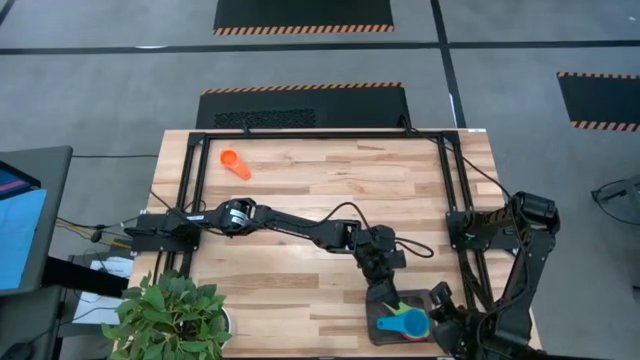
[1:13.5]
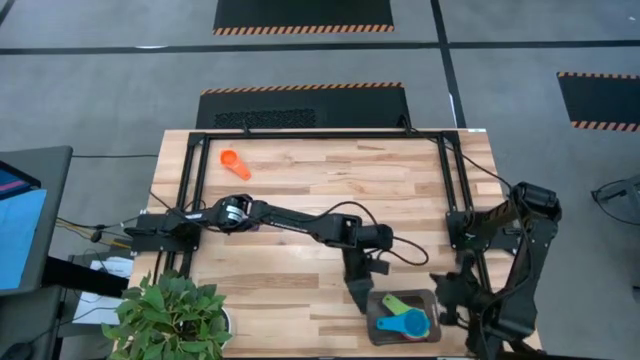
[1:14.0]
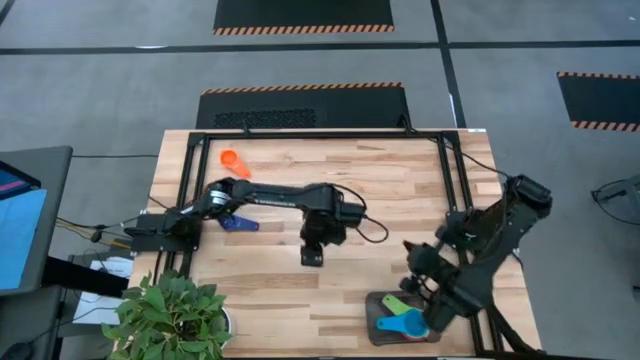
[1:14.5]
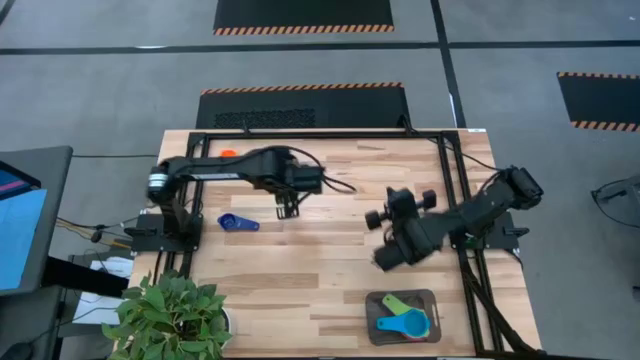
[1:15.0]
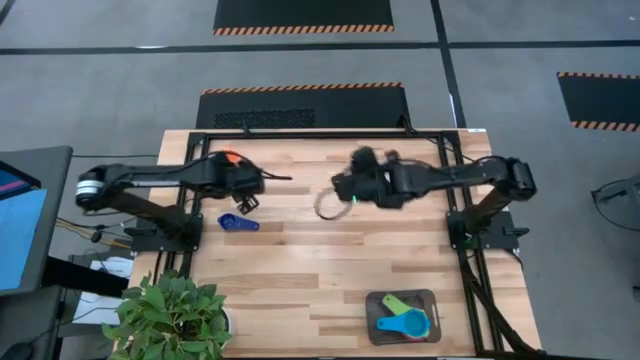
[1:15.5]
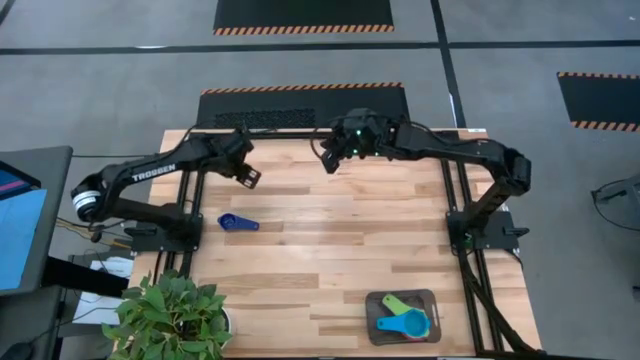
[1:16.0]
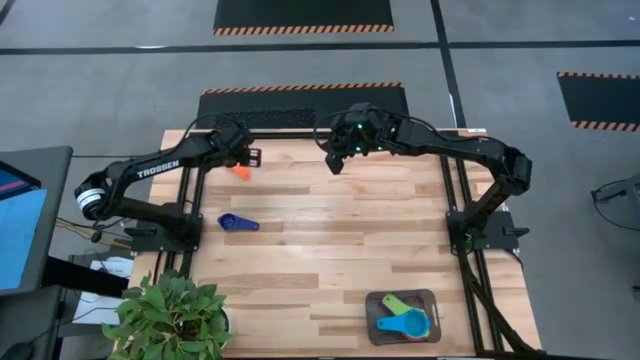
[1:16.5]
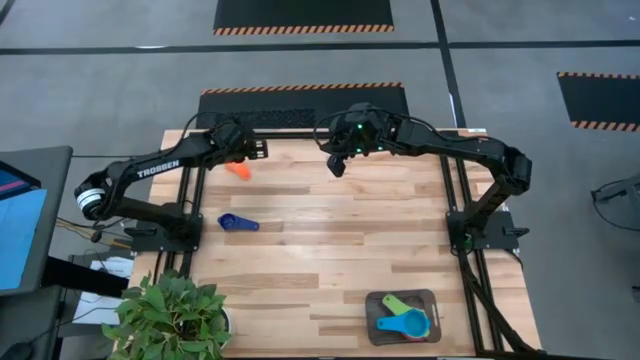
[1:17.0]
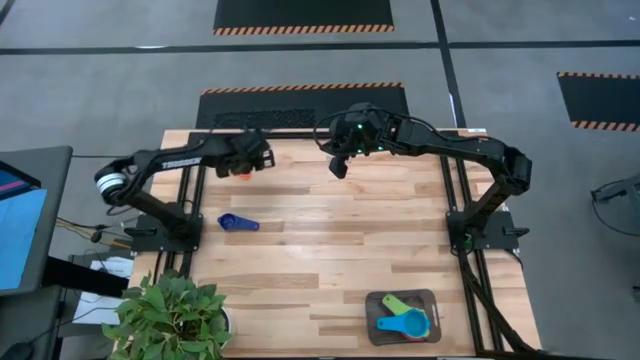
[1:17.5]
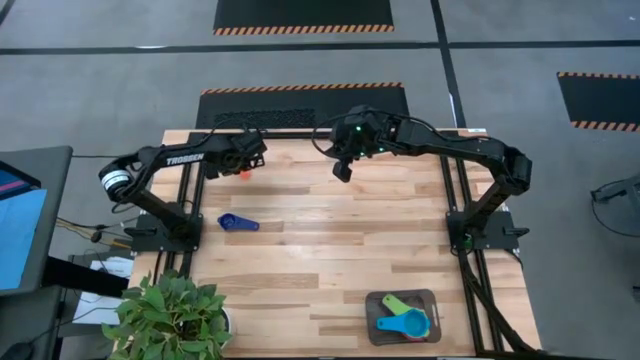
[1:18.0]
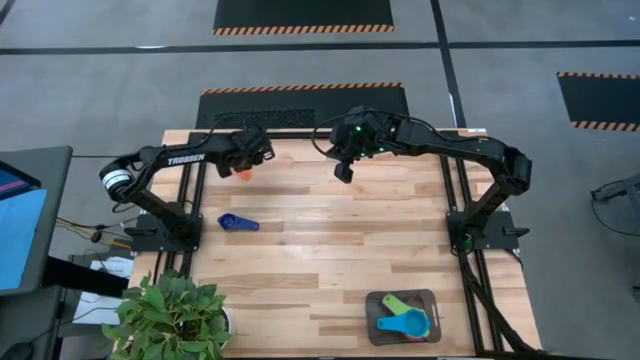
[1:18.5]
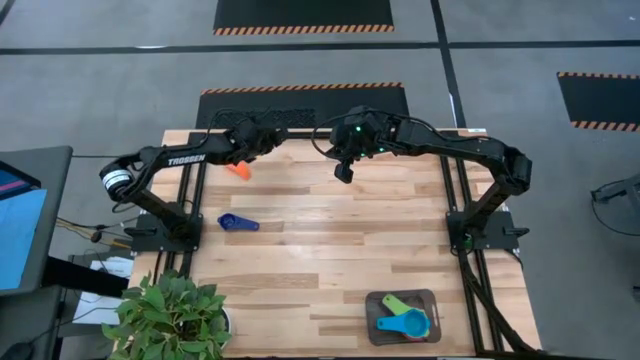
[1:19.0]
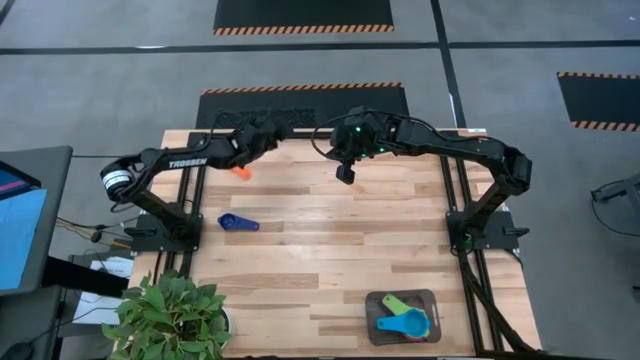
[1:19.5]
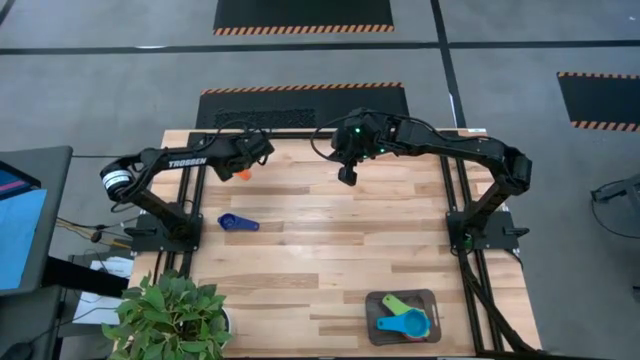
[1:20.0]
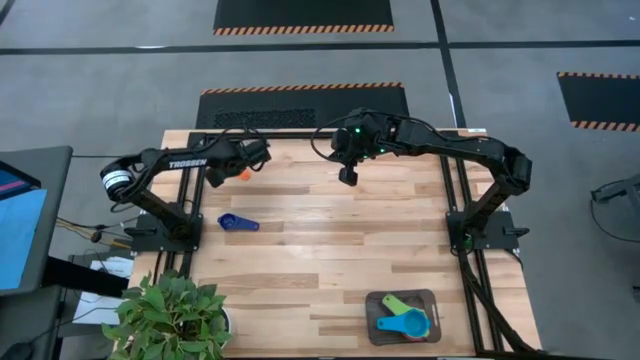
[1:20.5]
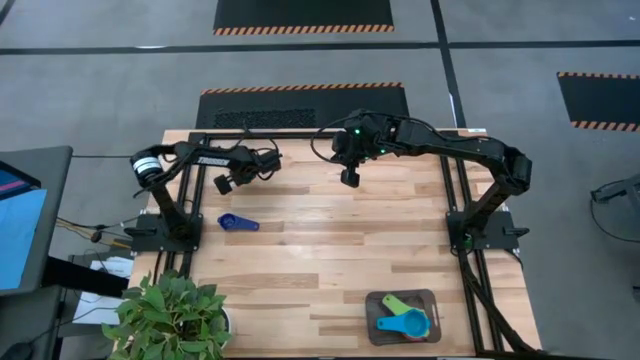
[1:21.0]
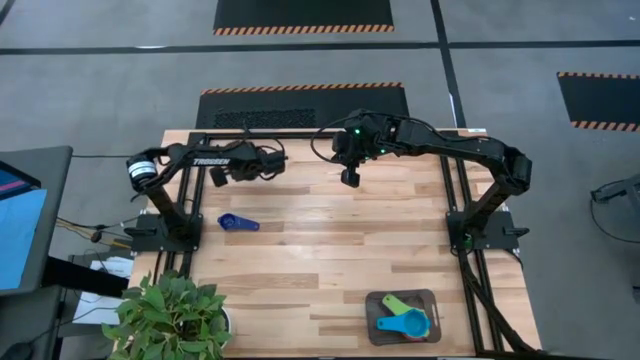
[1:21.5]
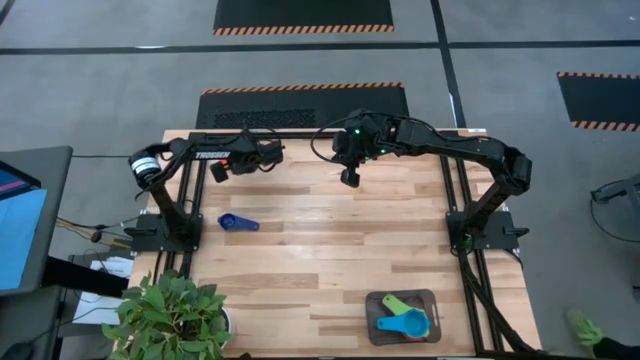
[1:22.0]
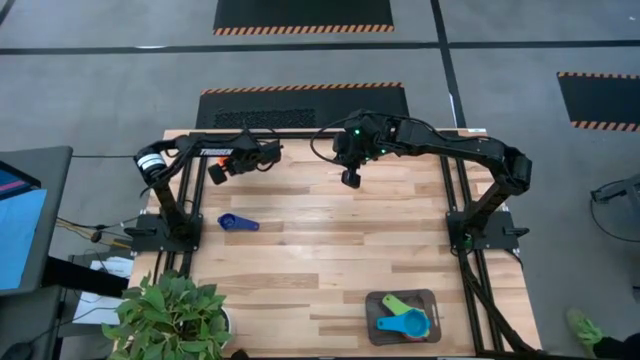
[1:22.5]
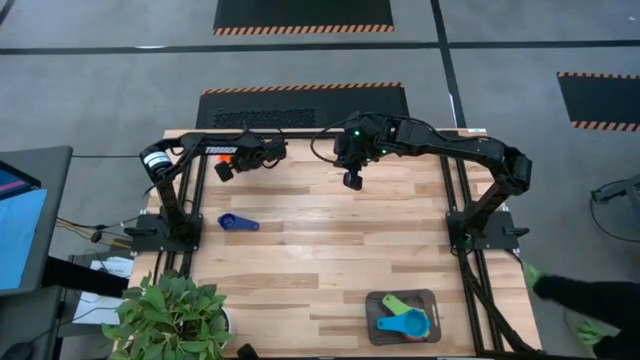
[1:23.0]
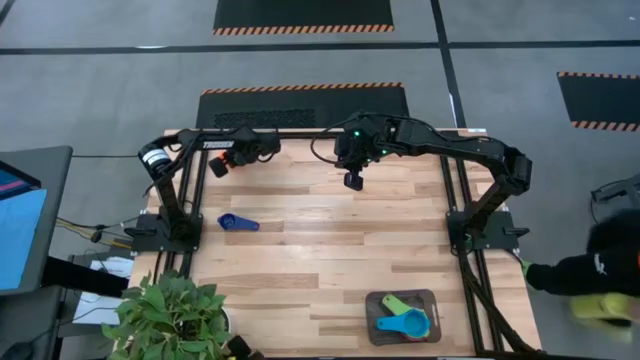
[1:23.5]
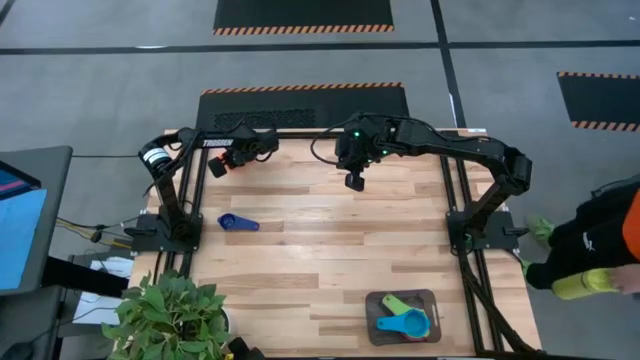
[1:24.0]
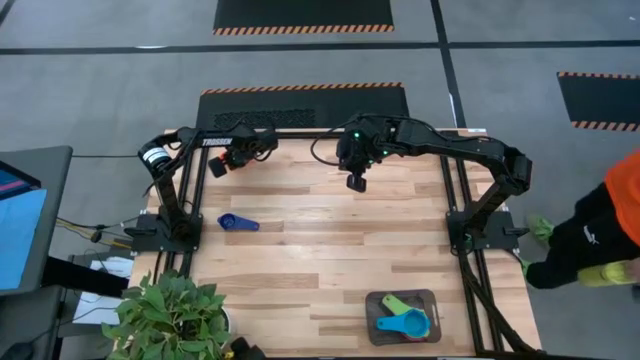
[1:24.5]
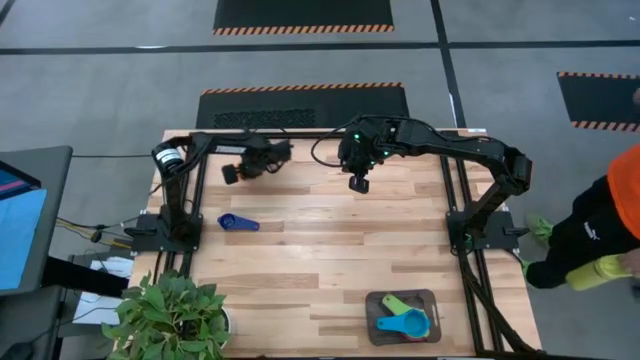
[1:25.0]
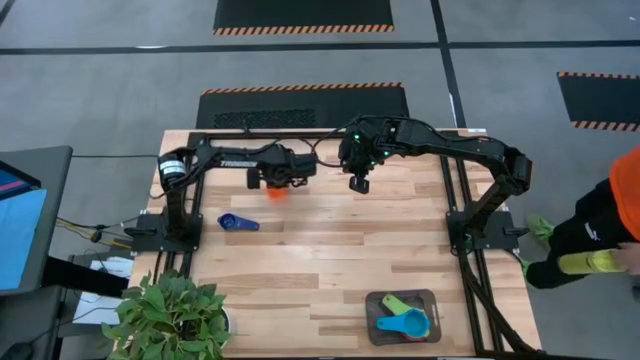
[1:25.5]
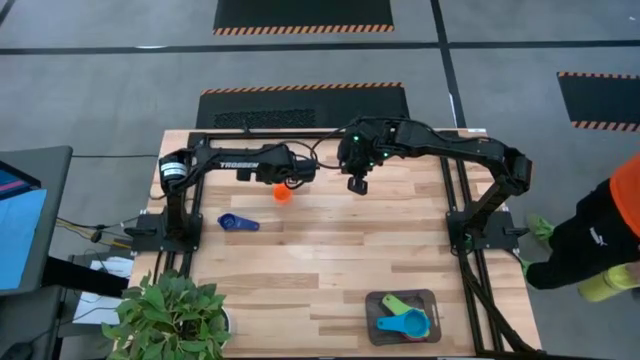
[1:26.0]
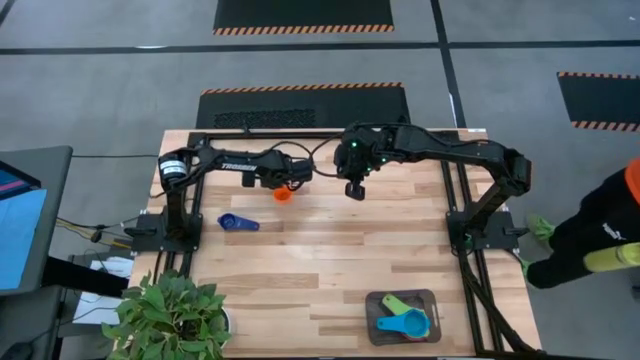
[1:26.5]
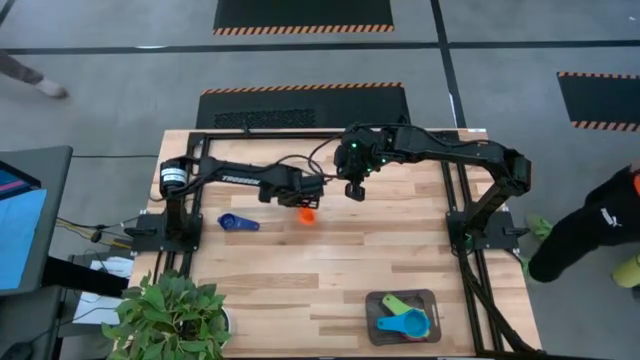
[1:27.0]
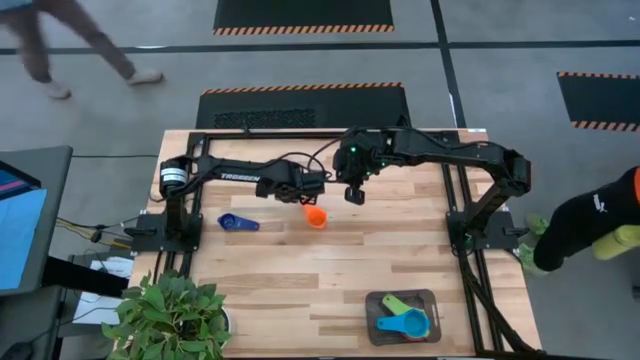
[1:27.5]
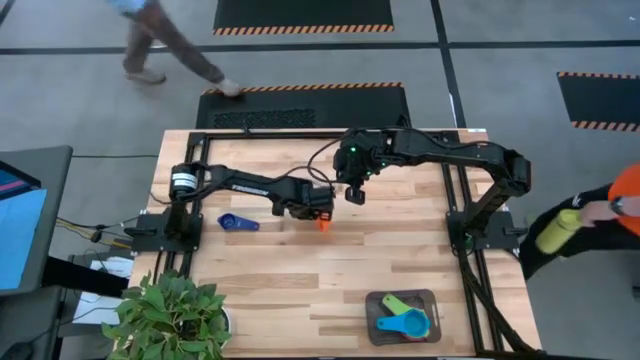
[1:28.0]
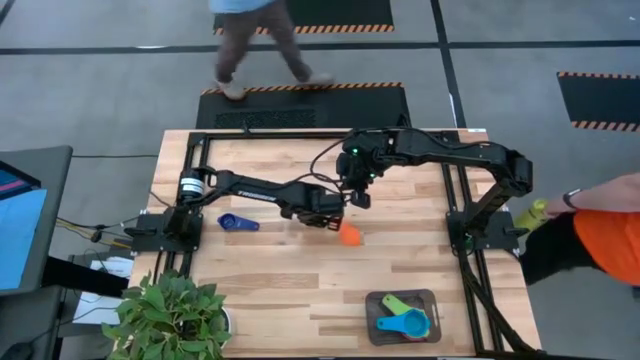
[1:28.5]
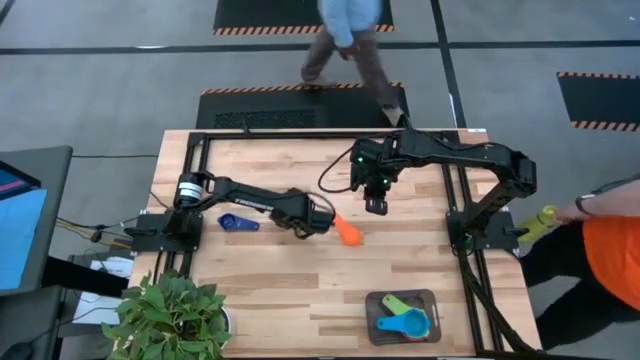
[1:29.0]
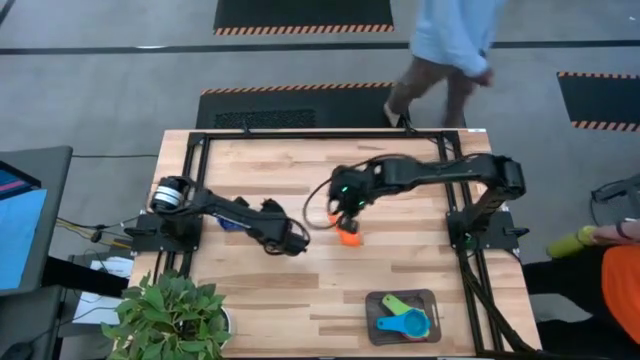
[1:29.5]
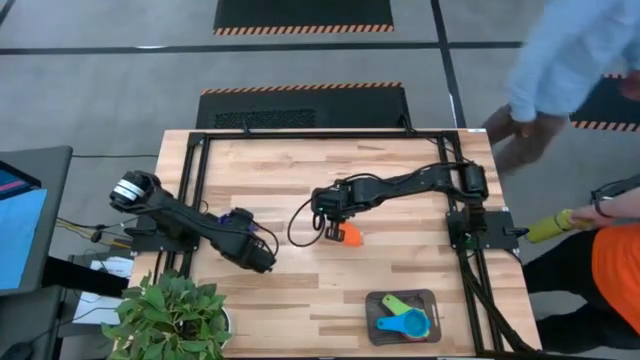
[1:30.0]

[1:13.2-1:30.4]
Task: Nest measuring cups in basket
Stack the orange measuring cup on top of the light blue measuring cup in the black bin

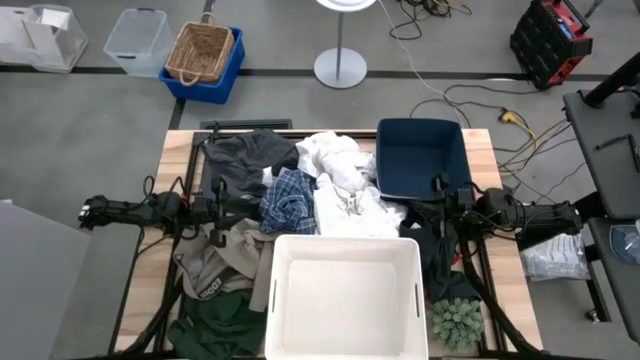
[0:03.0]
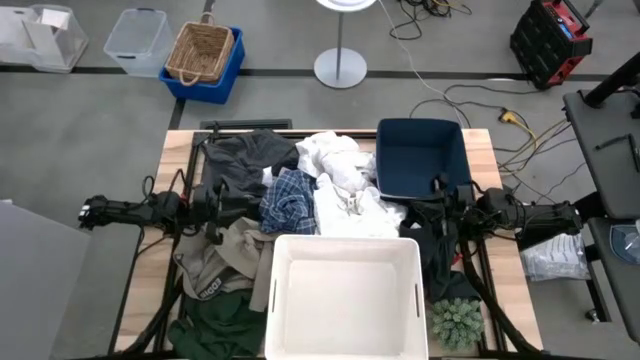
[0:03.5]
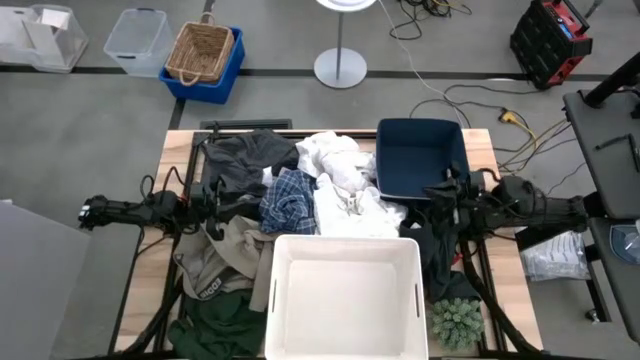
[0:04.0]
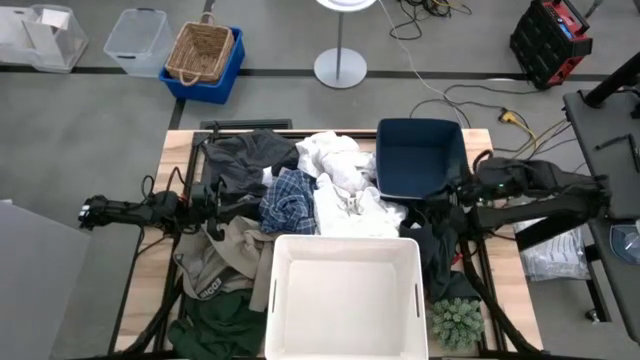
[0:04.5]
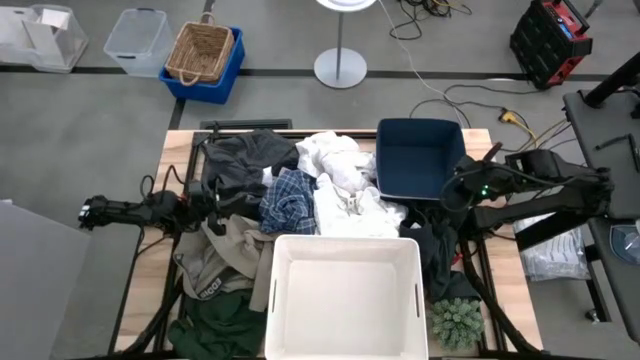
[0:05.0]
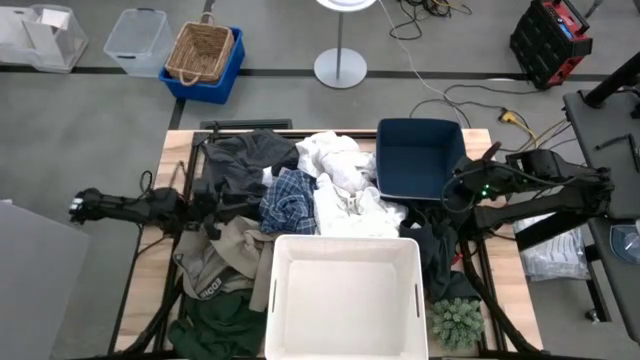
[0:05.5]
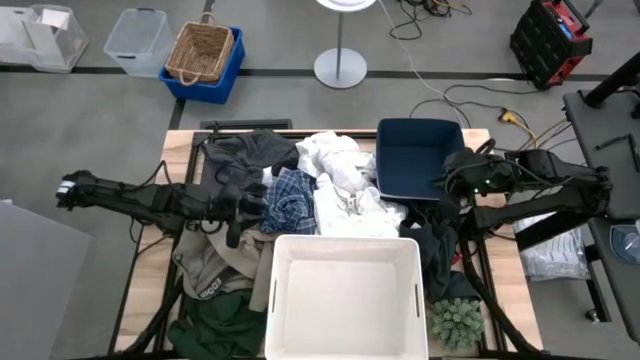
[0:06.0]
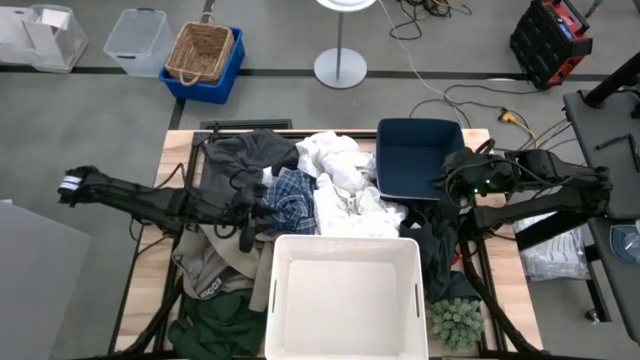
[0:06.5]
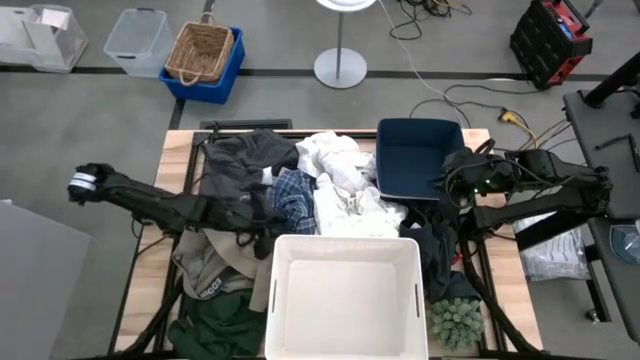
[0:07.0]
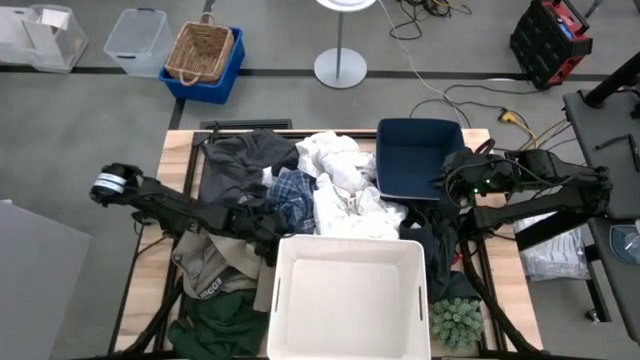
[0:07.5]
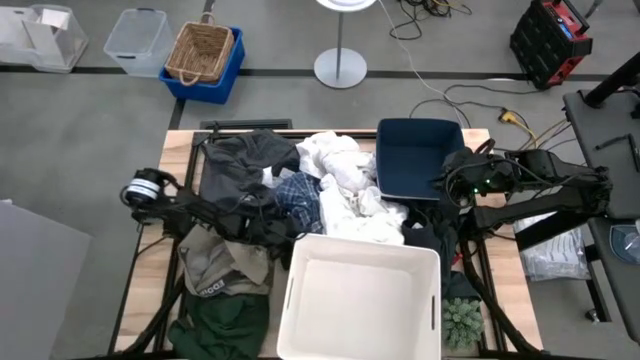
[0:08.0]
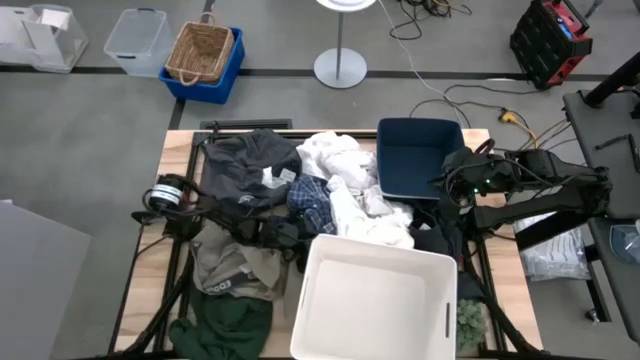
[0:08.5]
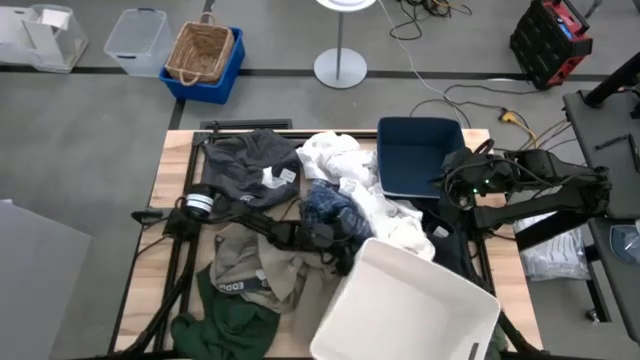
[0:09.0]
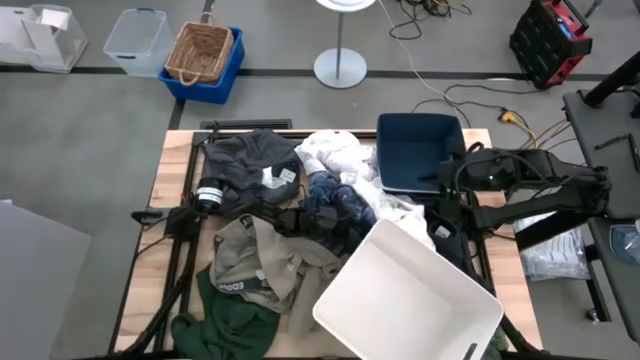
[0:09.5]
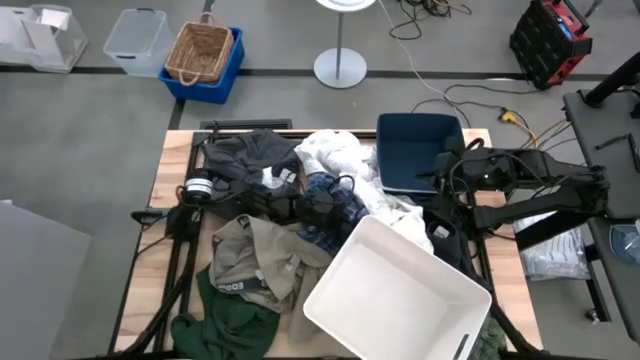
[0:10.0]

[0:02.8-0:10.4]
Task: Sort clothes
Adjust the clothes
